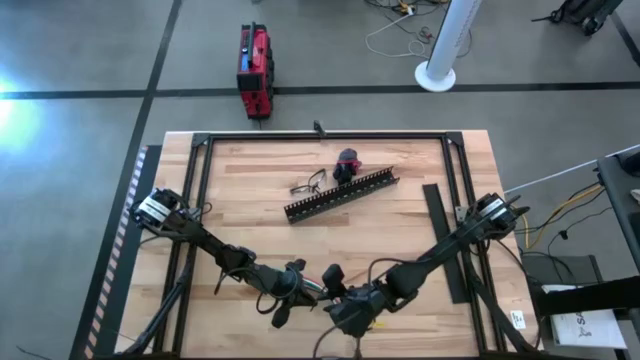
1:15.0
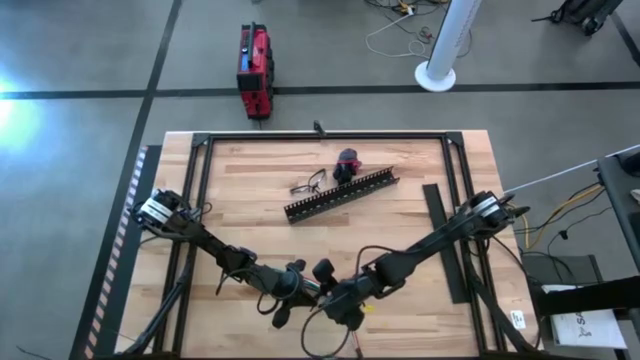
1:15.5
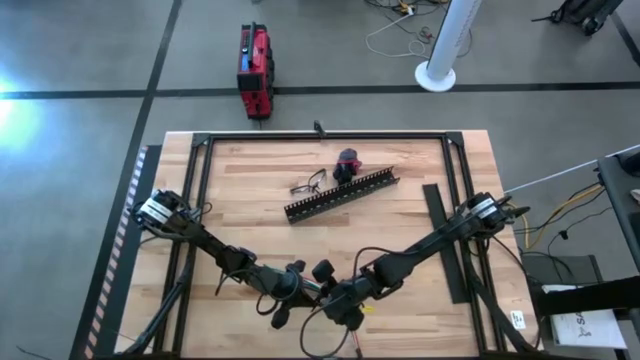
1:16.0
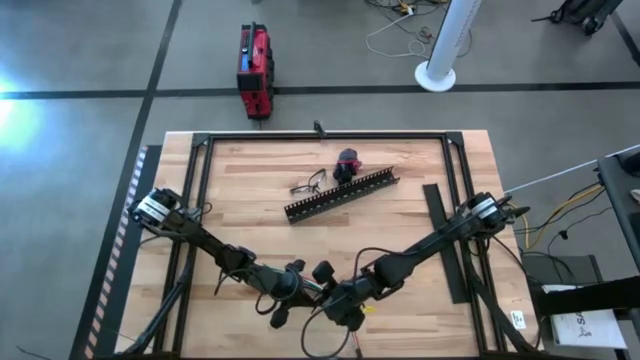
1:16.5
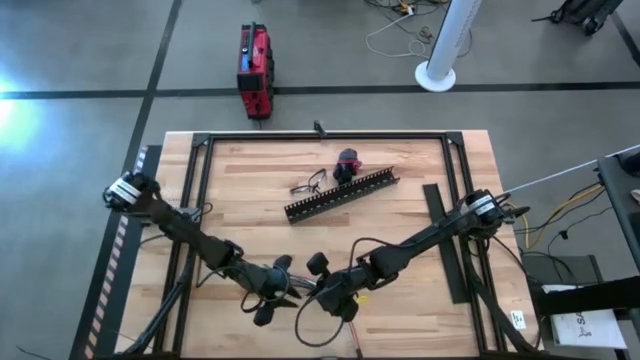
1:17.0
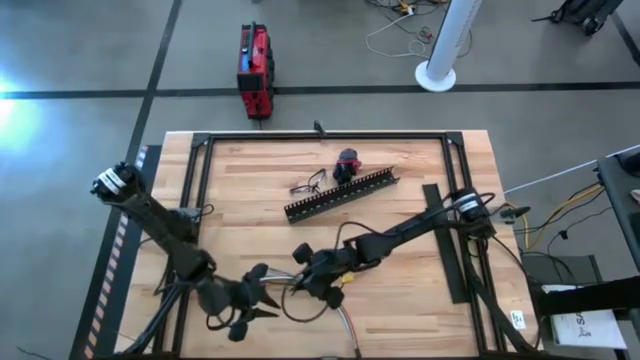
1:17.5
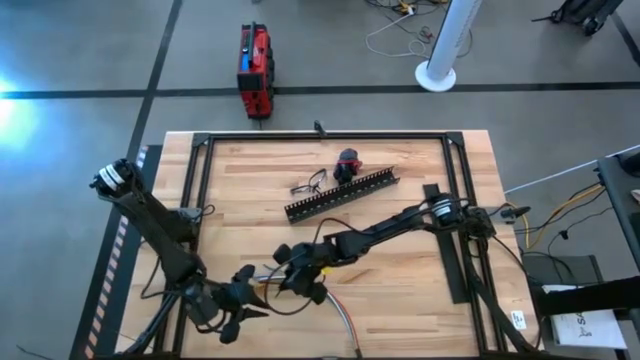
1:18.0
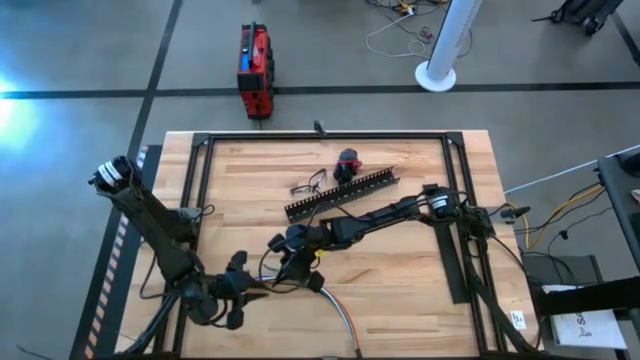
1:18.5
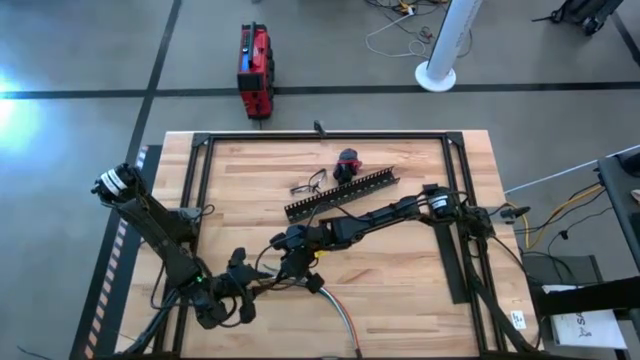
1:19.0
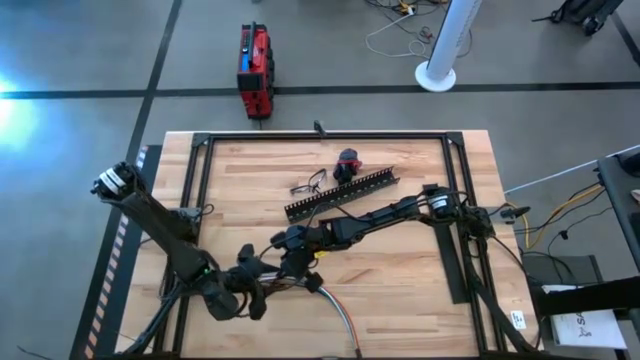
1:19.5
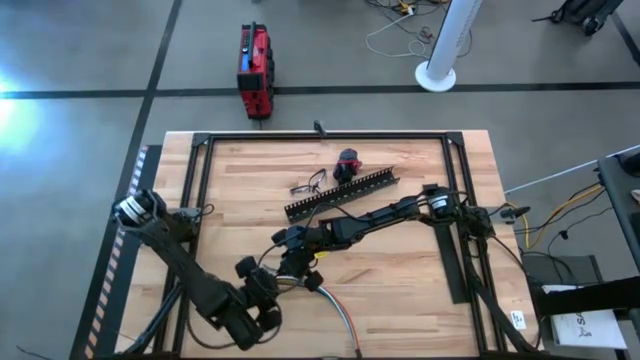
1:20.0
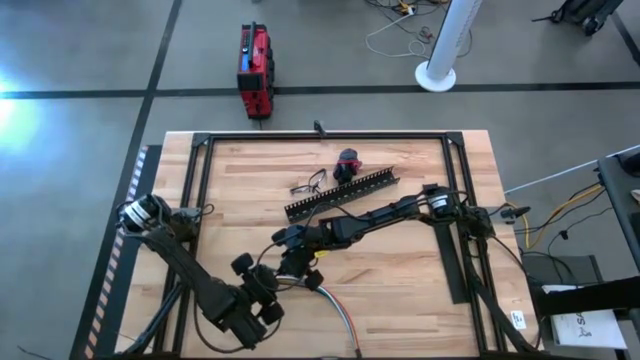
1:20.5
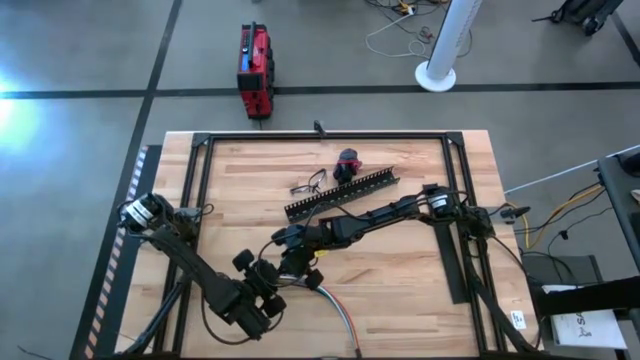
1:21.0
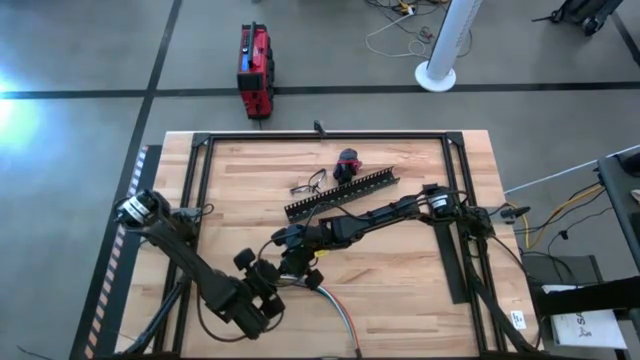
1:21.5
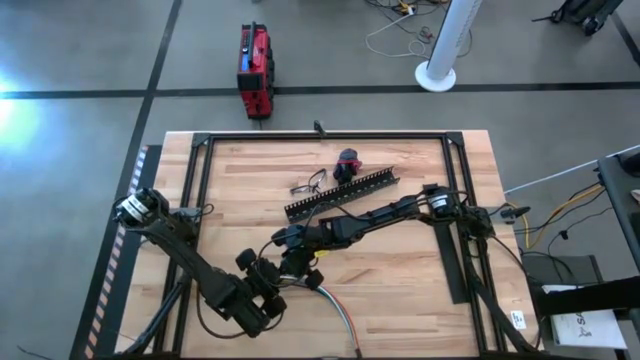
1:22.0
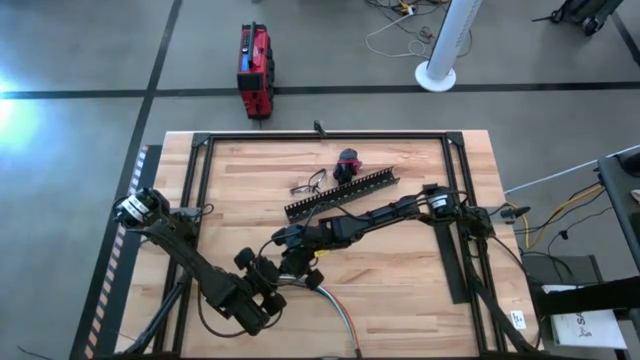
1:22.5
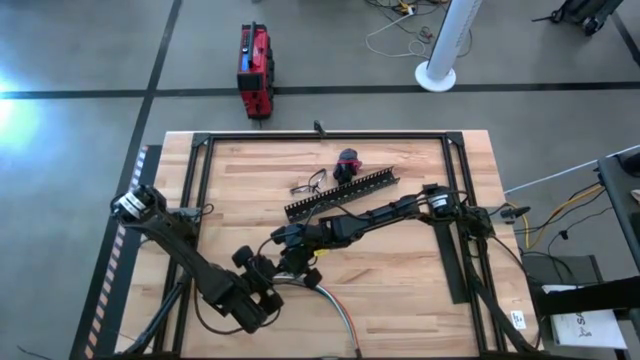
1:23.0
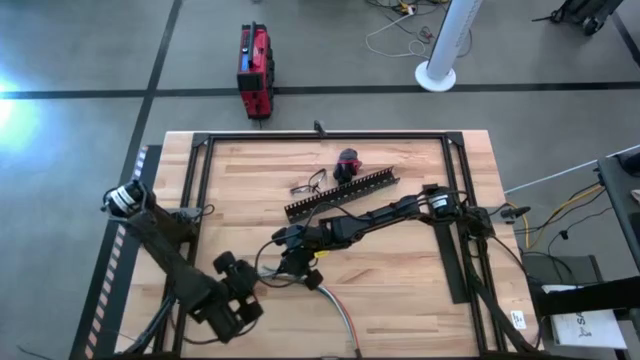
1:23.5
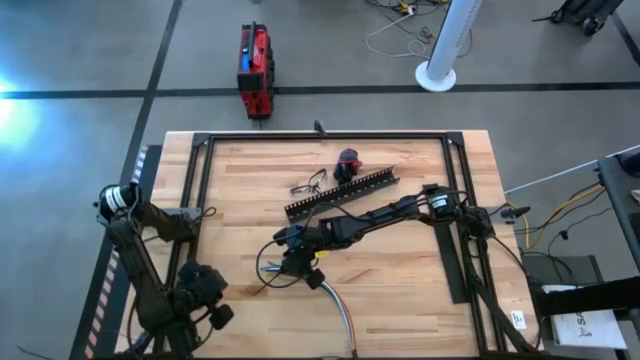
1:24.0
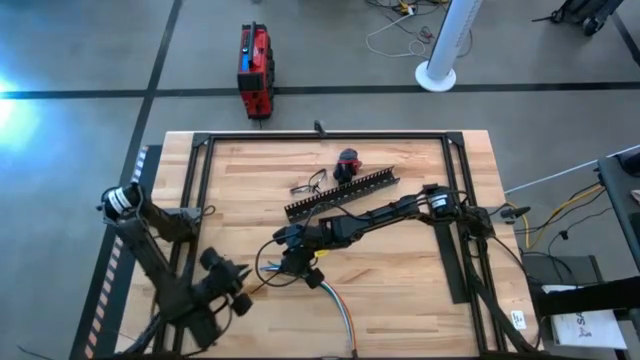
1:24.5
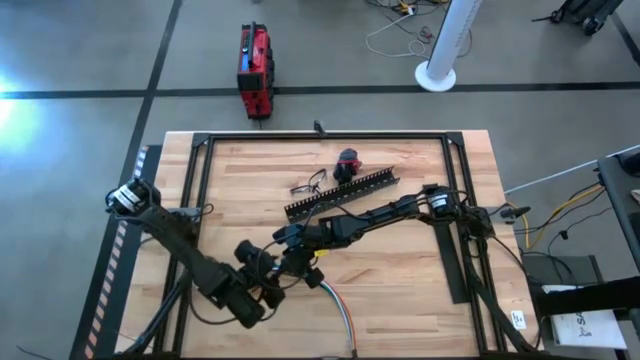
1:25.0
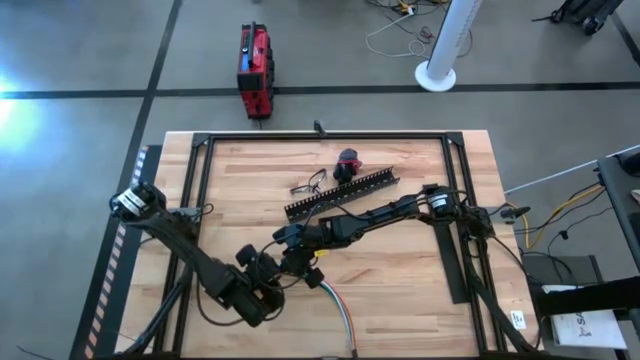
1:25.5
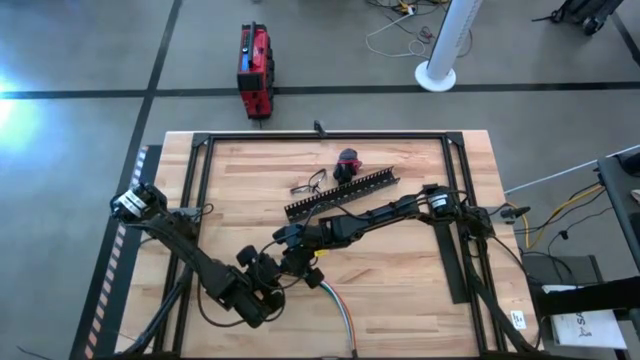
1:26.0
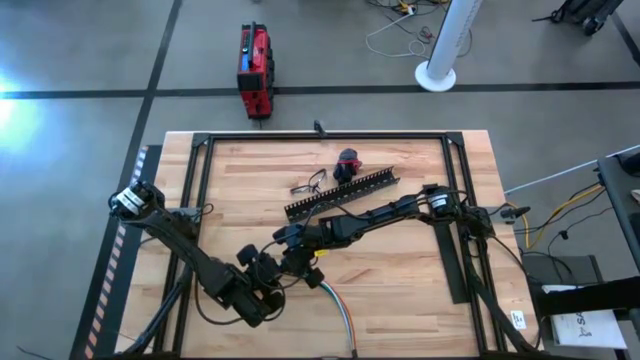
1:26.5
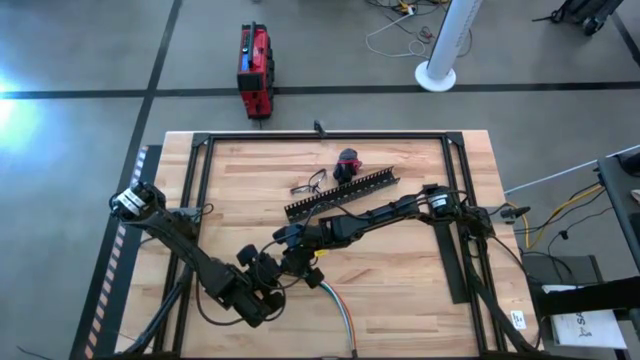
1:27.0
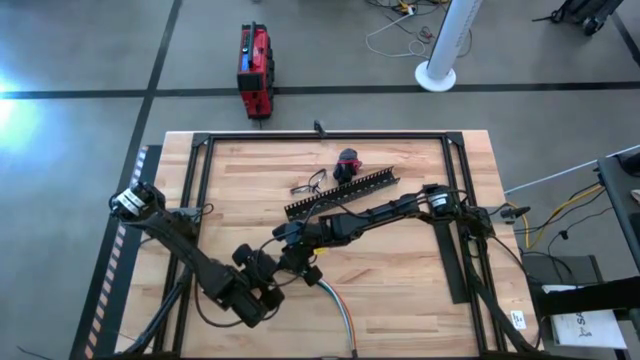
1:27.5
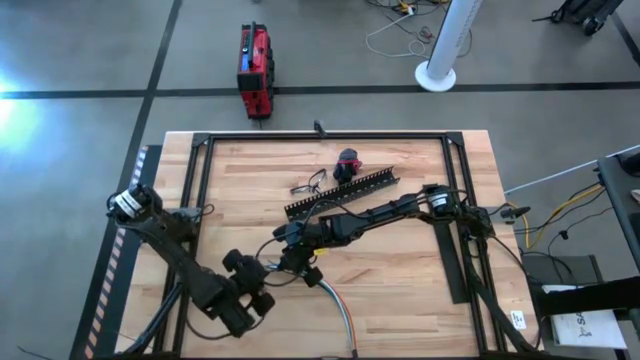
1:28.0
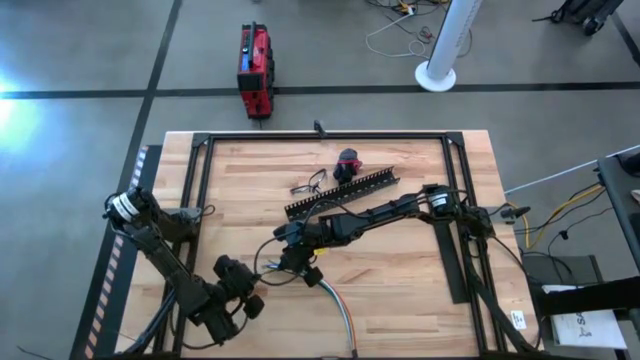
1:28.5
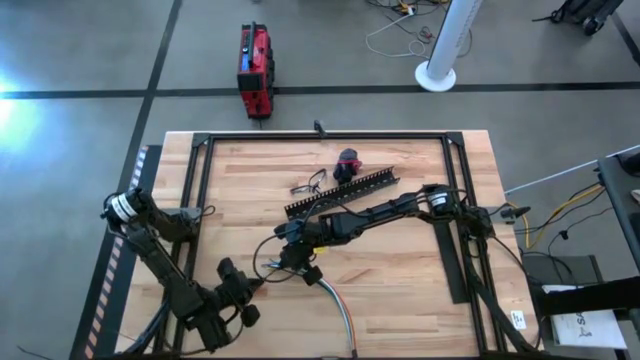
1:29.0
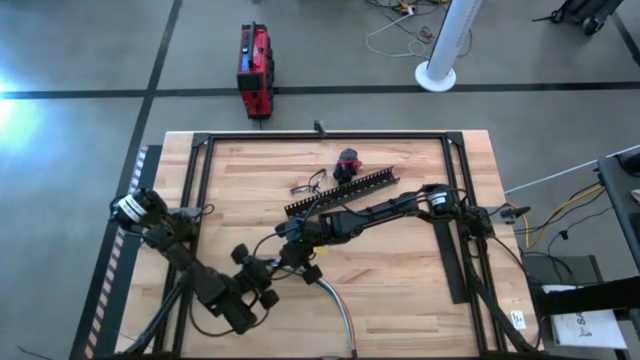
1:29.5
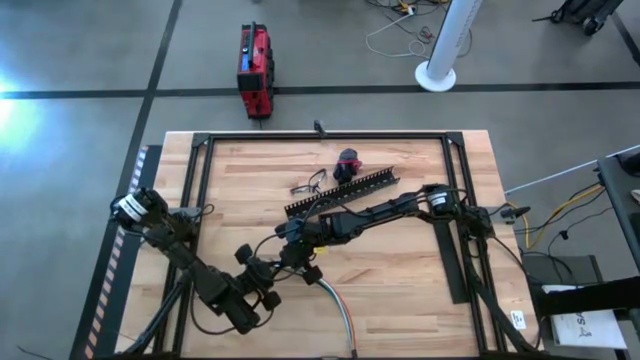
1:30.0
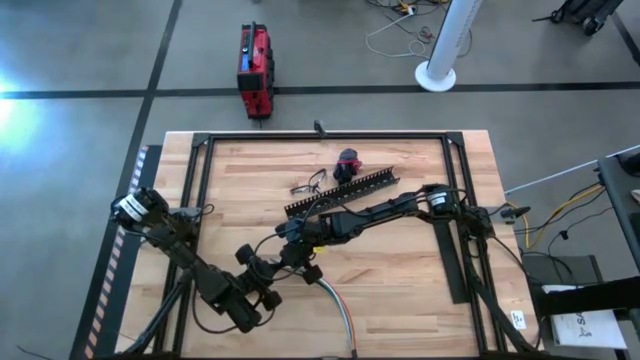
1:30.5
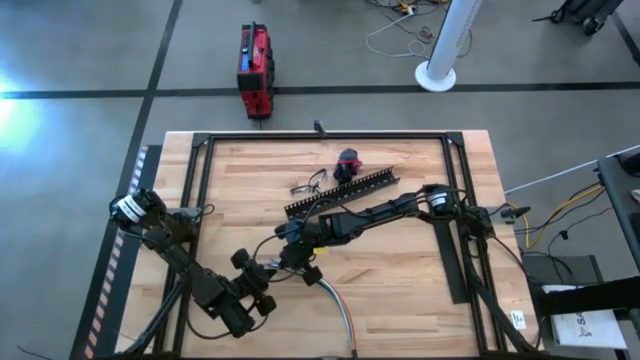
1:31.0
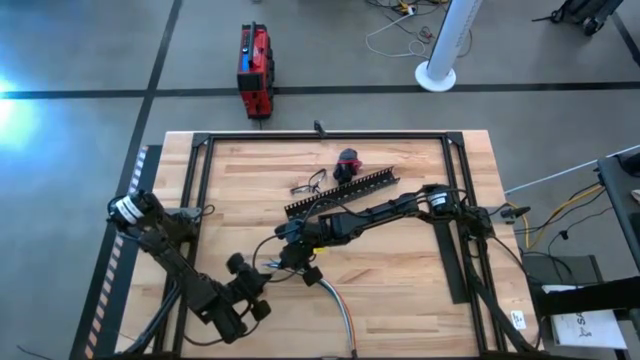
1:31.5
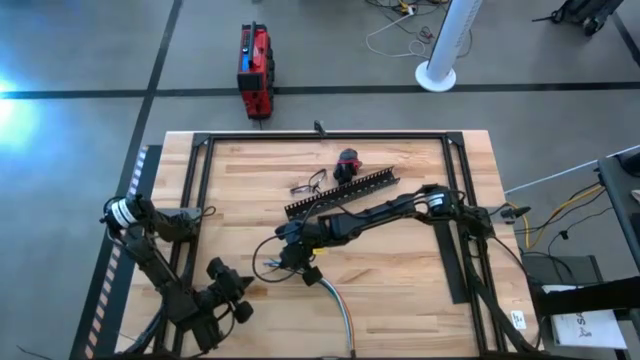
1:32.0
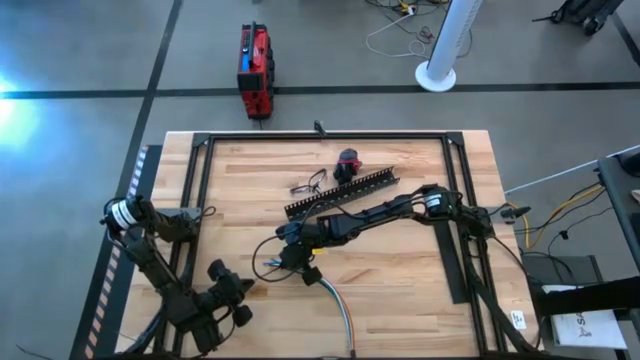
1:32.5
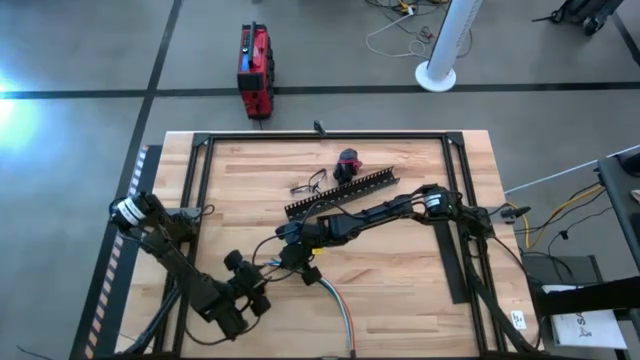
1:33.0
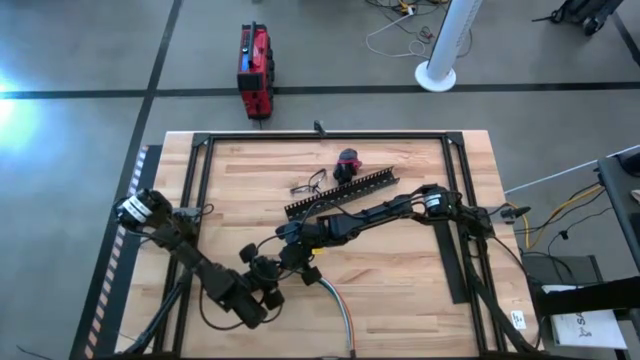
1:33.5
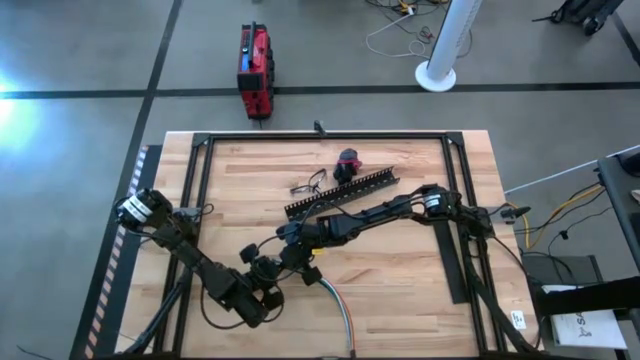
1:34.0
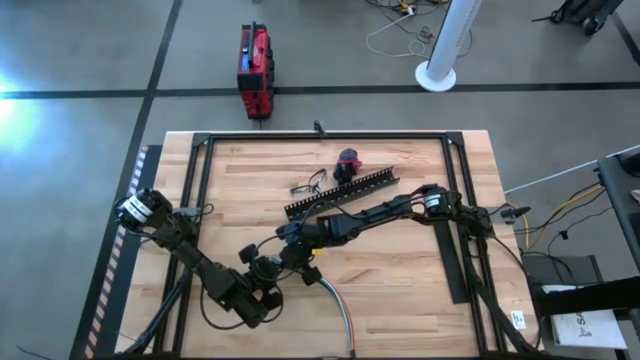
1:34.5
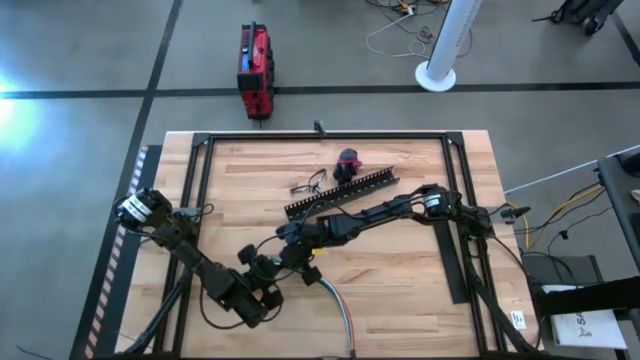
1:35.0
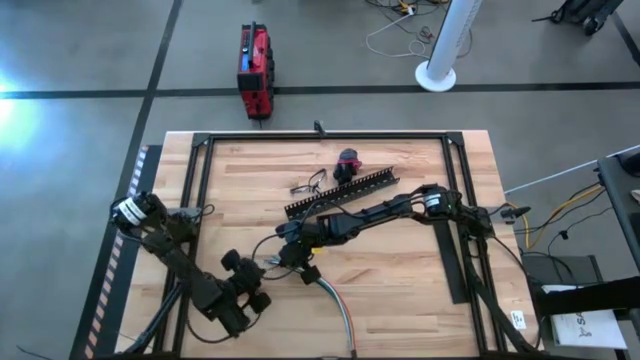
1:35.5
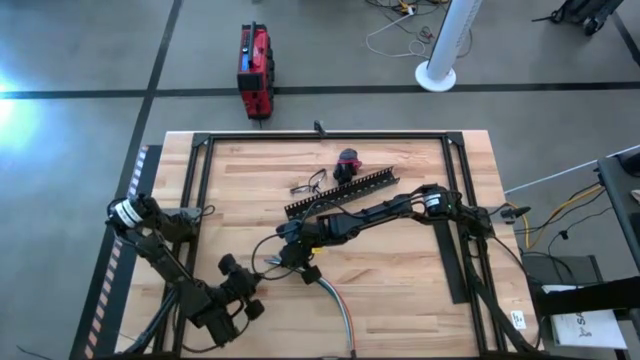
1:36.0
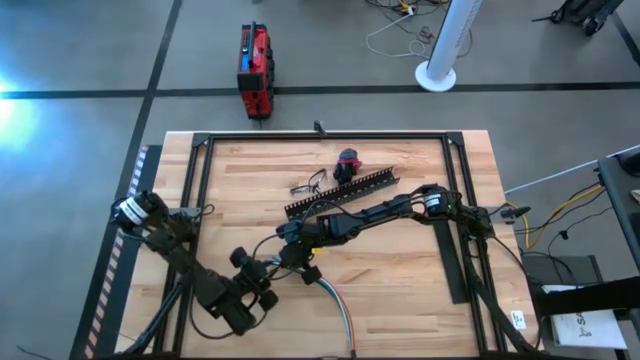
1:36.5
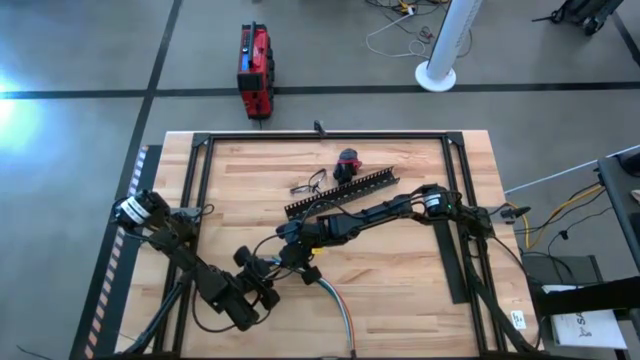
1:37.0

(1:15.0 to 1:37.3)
Task: Ziptie cables
Wrap the cable wires with black zip tie
